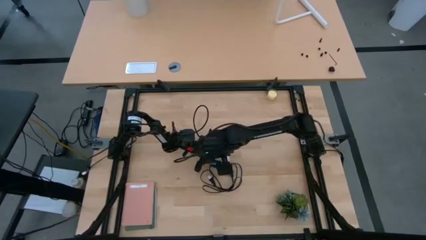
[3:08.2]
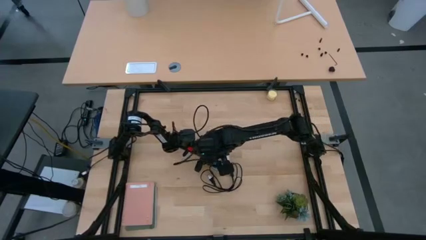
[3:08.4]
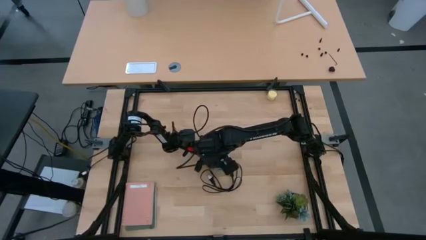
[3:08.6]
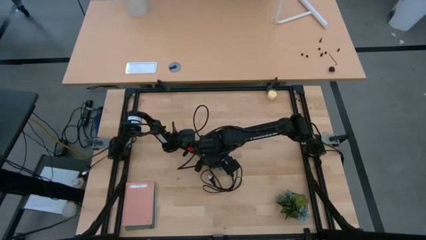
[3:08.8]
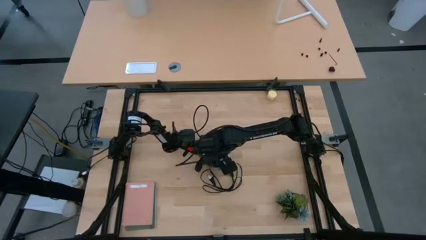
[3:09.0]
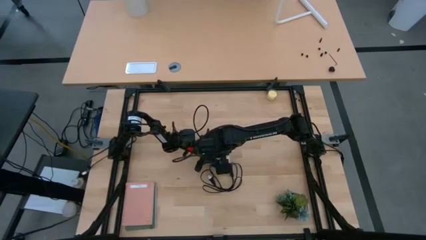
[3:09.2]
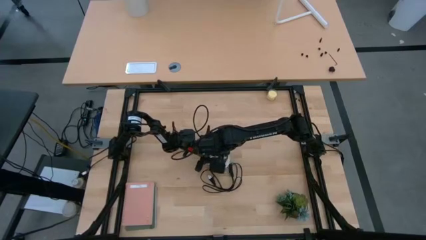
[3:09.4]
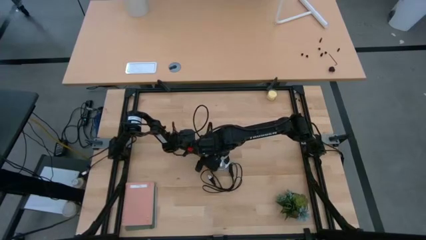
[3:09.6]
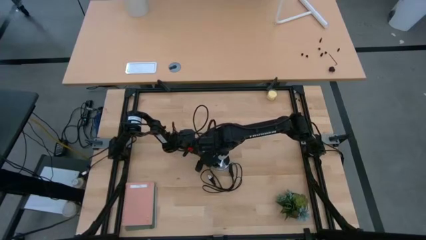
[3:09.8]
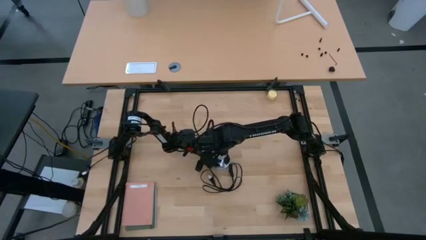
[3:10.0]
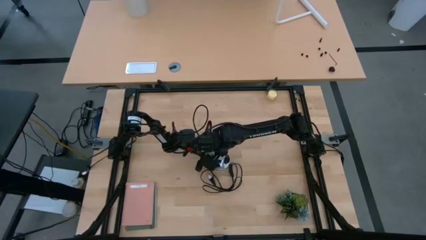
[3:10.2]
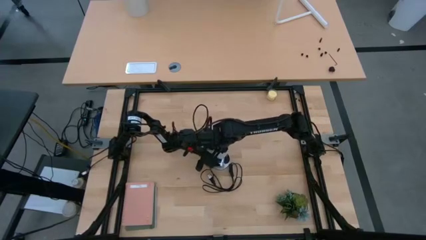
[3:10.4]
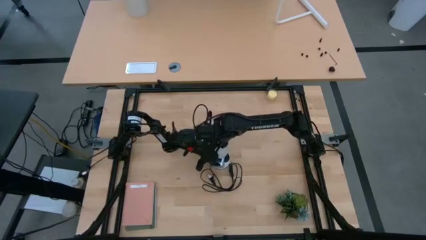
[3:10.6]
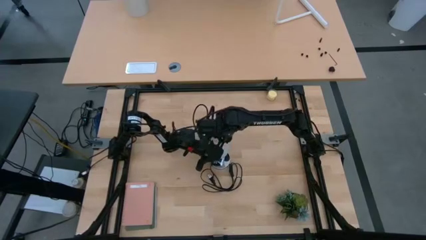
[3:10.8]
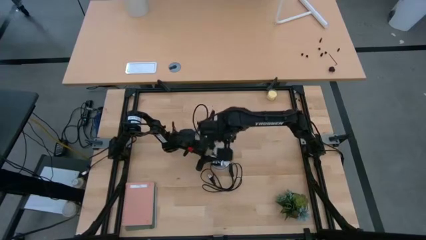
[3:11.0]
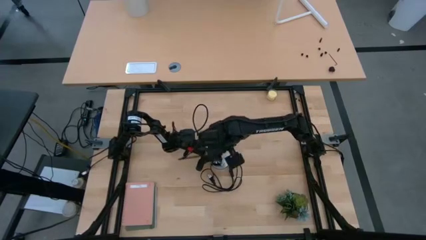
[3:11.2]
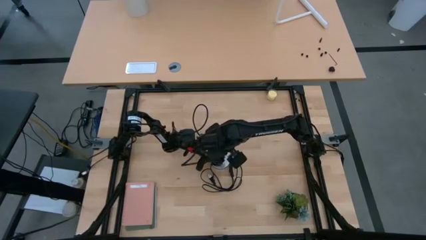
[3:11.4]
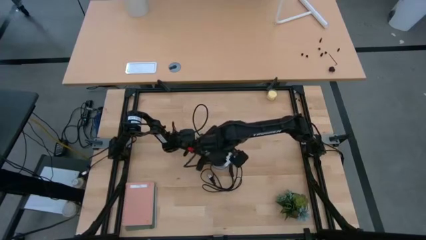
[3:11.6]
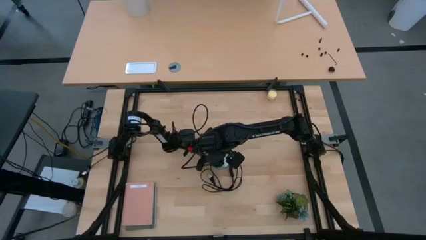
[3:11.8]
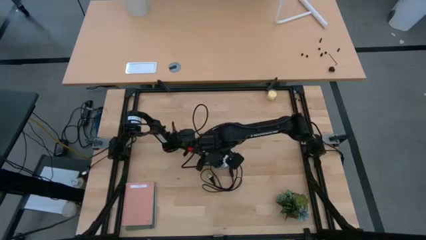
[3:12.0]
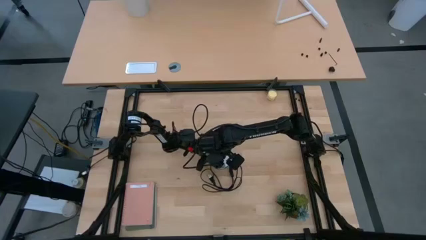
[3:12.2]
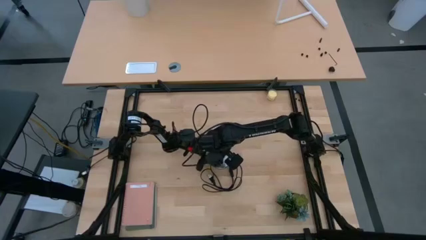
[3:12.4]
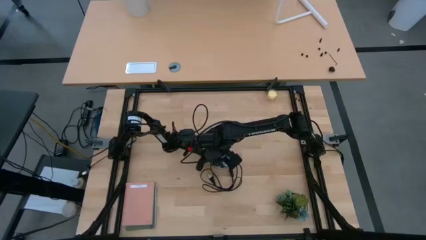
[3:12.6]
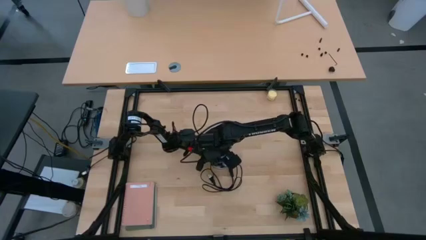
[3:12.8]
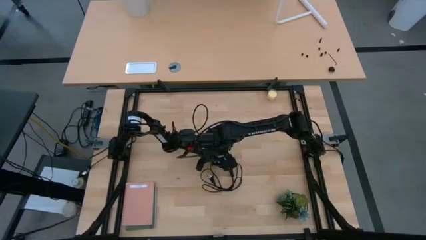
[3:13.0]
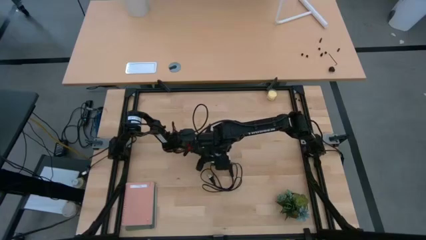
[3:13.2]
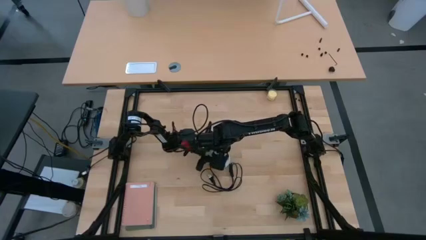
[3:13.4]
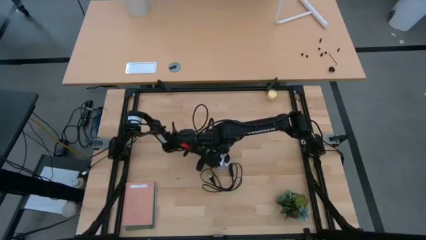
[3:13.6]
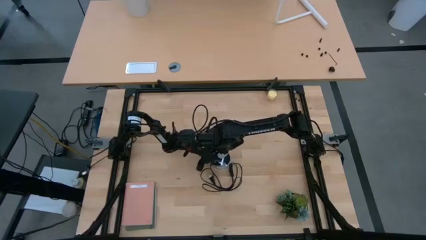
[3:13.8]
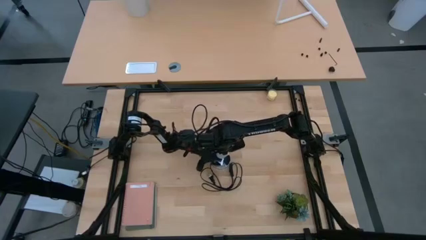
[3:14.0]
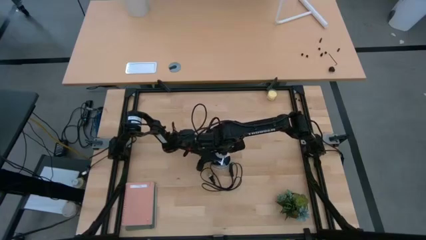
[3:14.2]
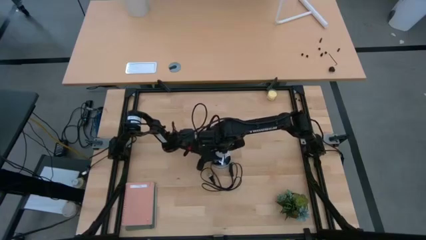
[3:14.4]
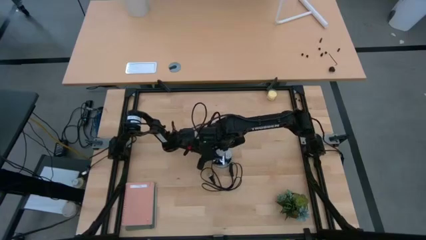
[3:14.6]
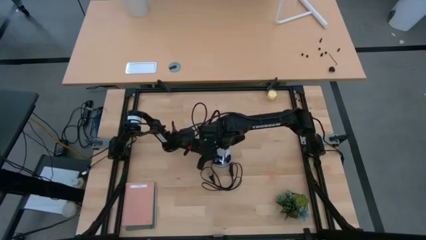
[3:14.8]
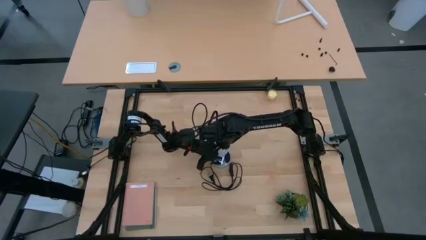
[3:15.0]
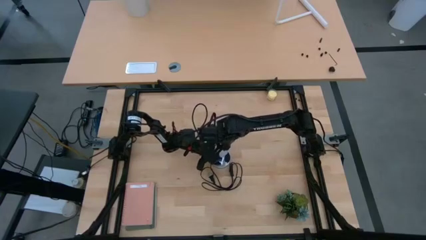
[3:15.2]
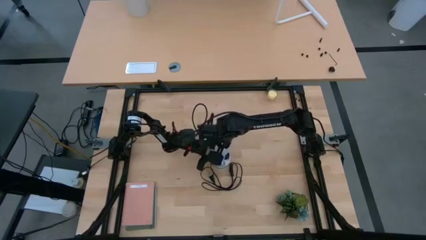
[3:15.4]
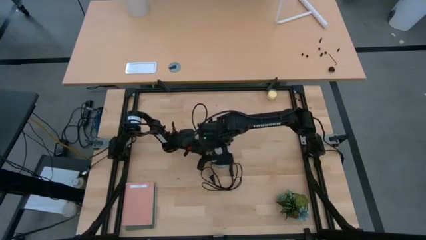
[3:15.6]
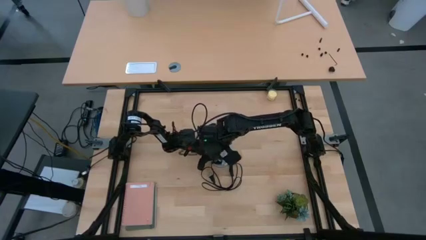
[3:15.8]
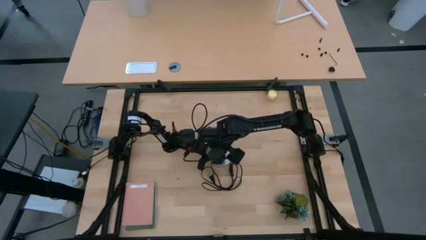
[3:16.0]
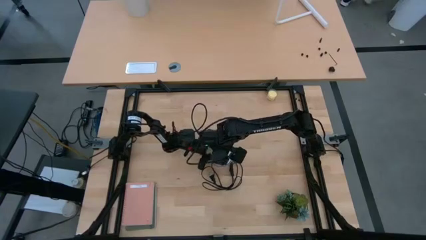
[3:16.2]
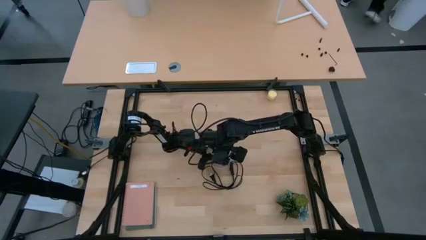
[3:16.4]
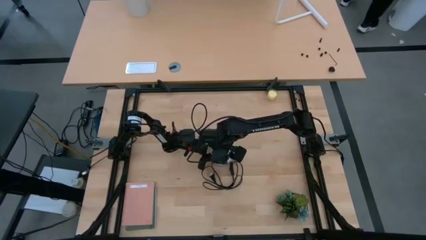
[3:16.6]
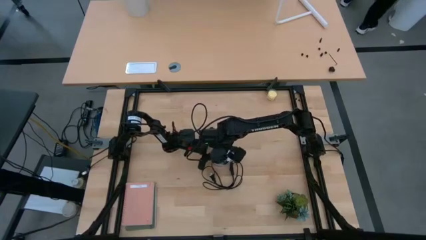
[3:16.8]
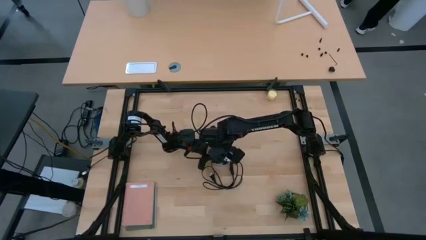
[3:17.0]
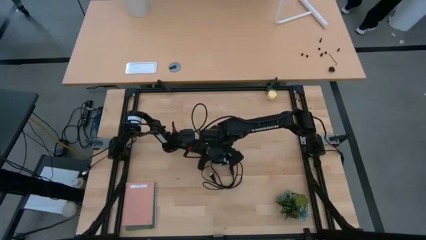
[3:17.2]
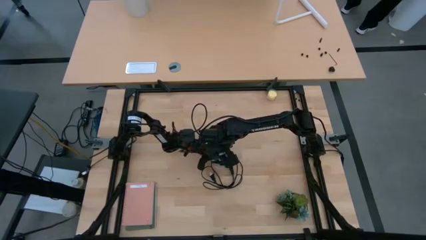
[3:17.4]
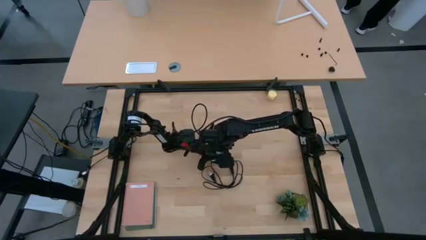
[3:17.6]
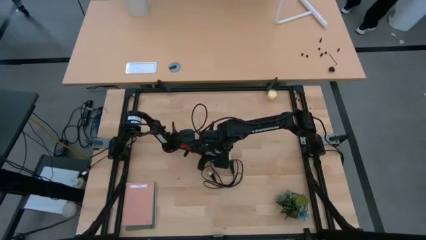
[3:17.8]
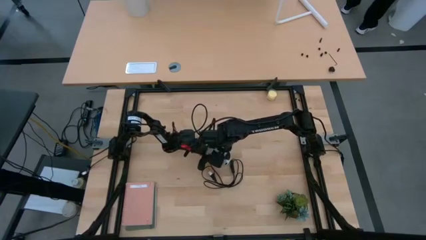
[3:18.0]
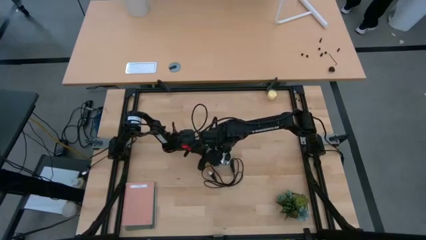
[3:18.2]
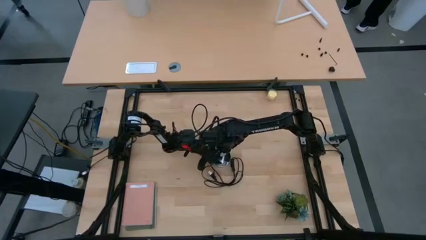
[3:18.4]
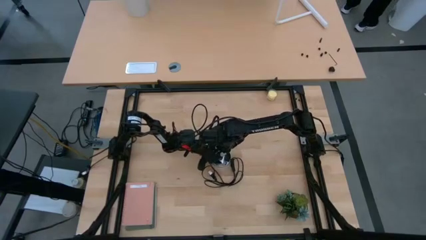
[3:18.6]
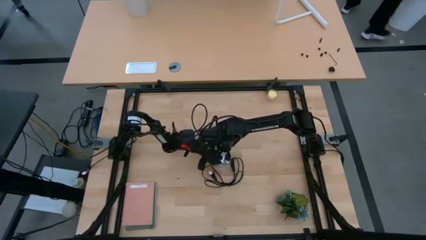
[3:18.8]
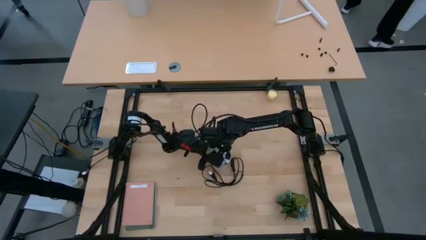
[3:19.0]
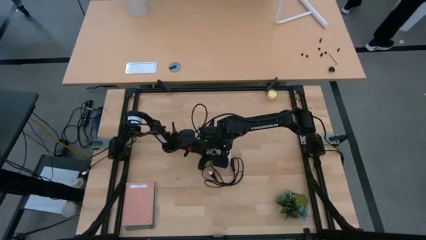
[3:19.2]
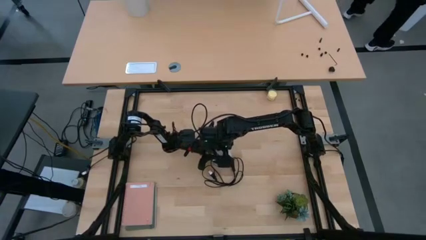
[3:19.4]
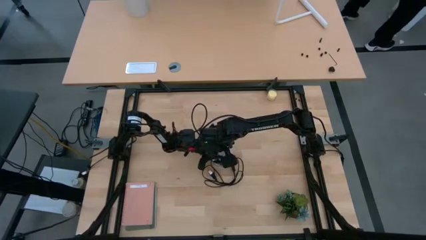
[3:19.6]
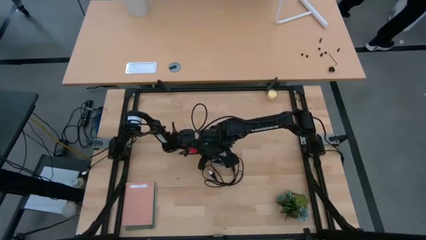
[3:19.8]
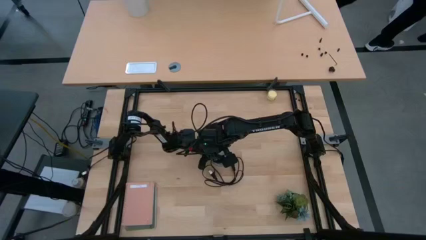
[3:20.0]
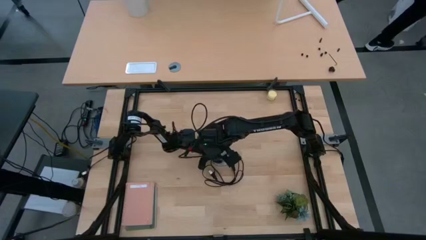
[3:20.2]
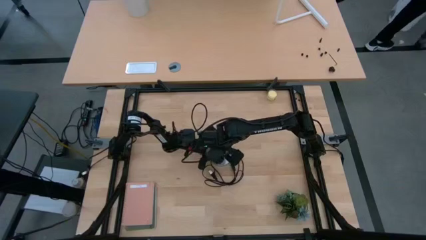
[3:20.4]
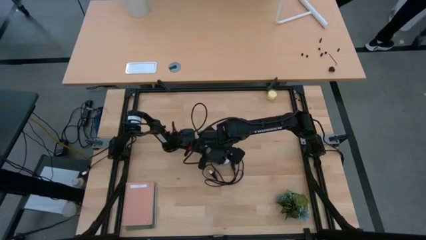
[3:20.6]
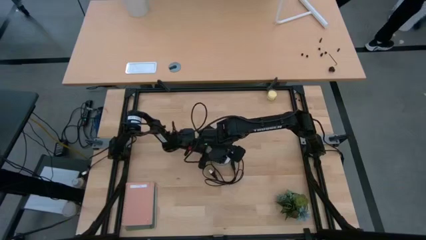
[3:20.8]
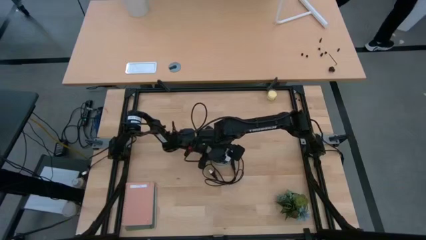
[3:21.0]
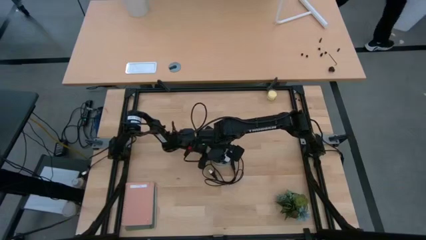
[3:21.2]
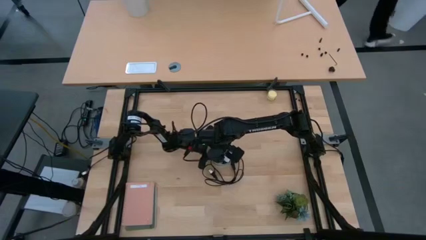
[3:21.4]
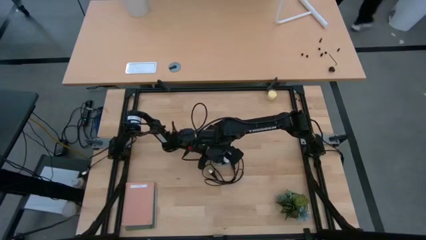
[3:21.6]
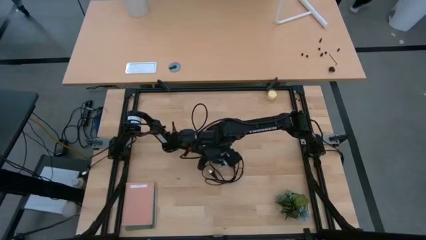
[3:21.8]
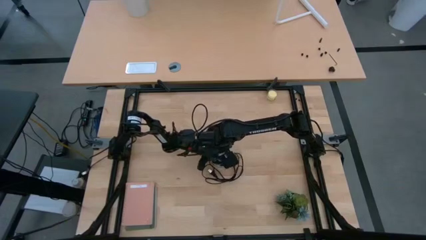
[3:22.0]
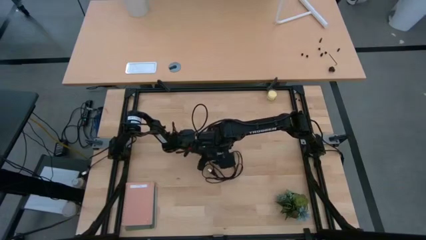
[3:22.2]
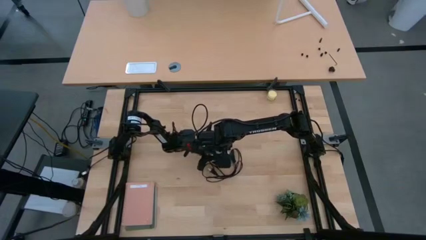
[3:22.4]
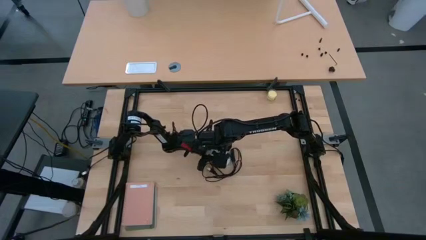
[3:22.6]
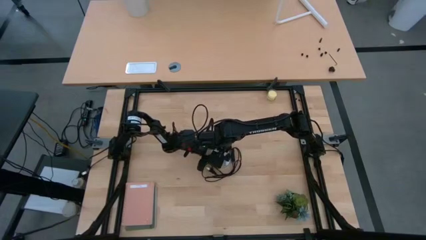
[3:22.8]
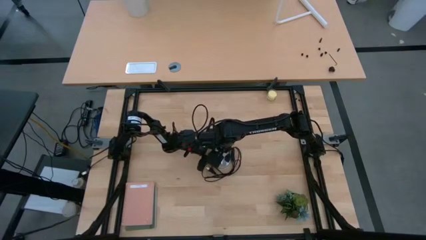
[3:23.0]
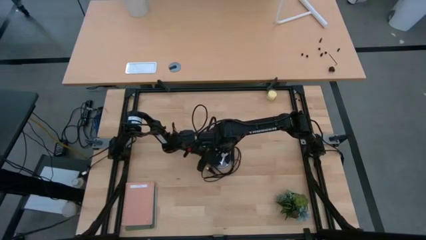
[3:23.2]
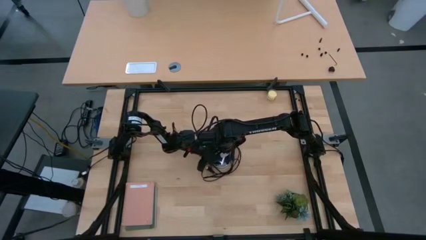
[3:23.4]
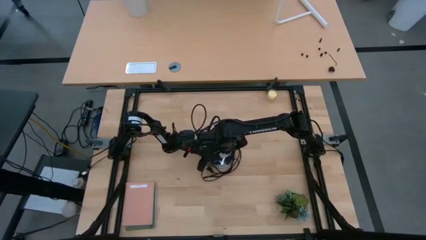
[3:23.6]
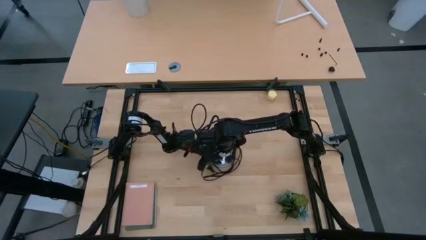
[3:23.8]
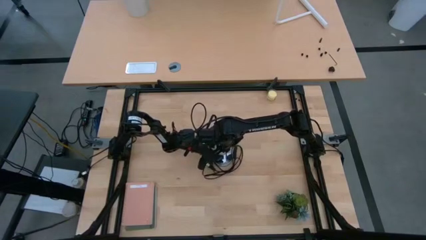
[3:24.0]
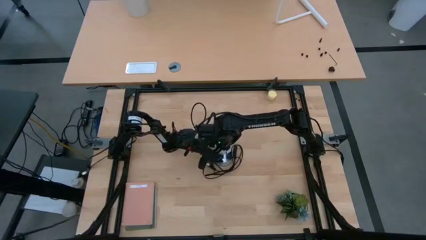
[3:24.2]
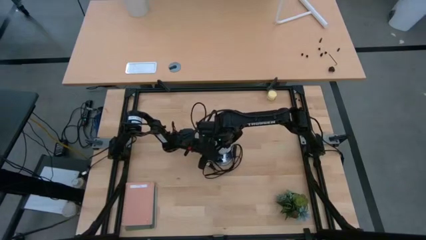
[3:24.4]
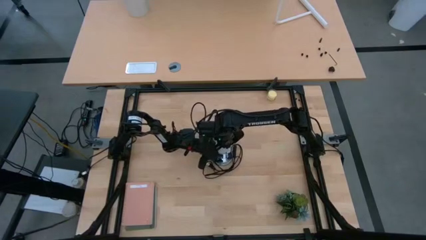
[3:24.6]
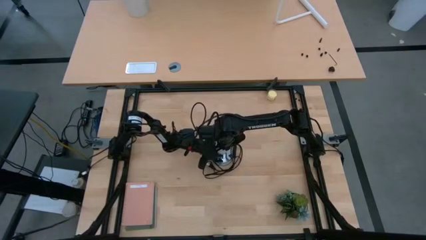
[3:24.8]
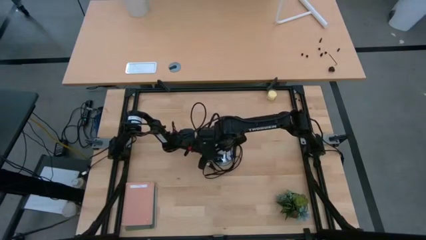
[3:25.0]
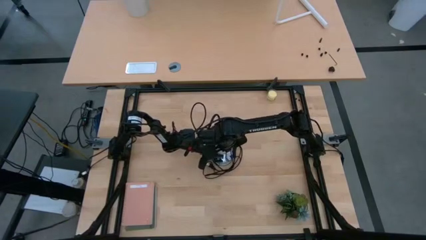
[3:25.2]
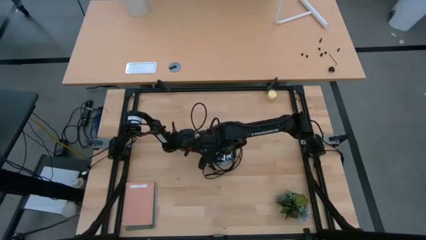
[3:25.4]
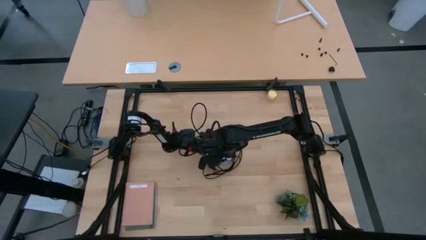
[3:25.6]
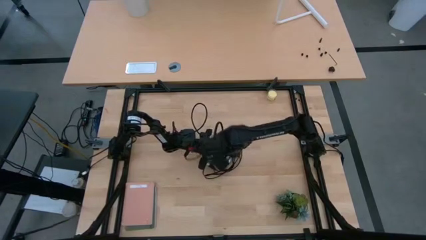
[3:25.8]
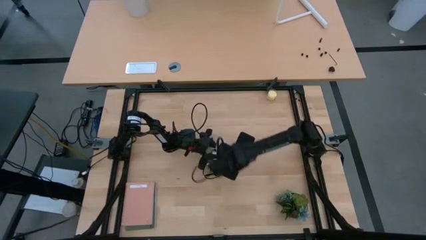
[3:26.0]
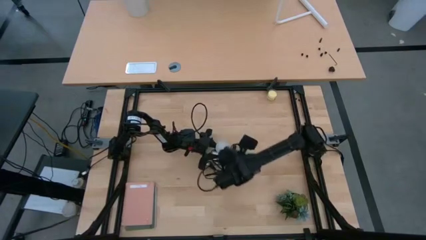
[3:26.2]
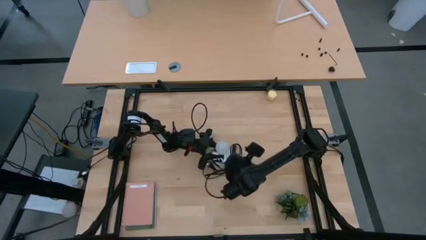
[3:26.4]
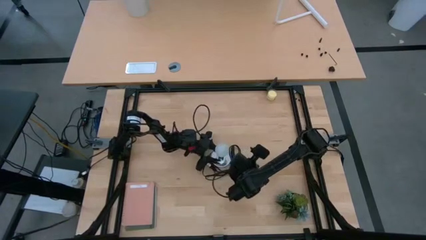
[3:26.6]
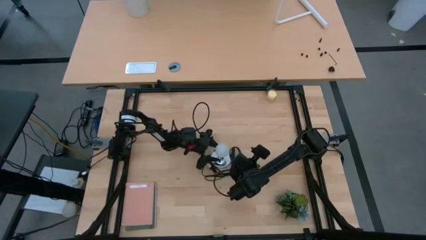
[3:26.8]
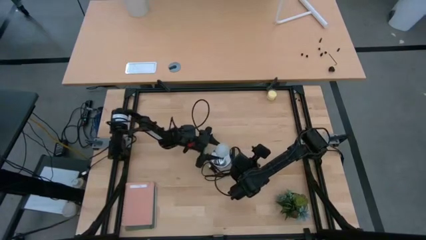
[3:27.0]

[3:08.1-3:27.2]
Task: Screw lightbulb
Insert the white lightbulb into the silver lamp
